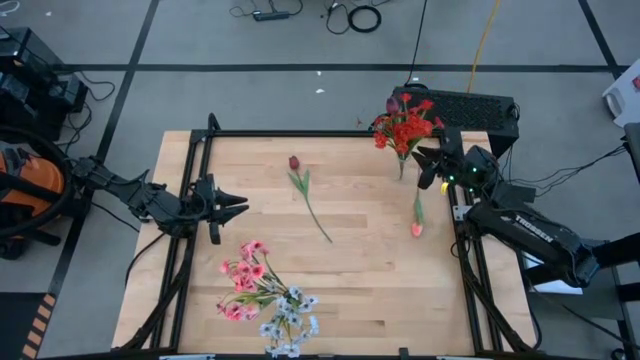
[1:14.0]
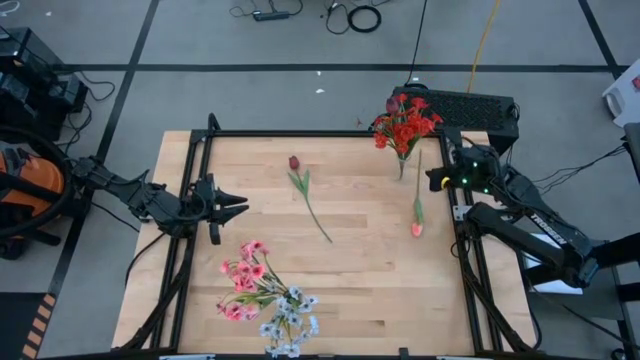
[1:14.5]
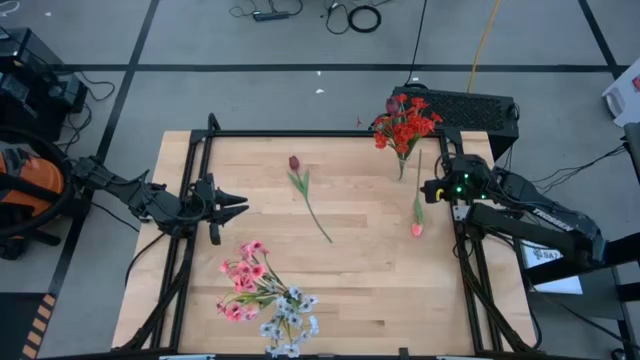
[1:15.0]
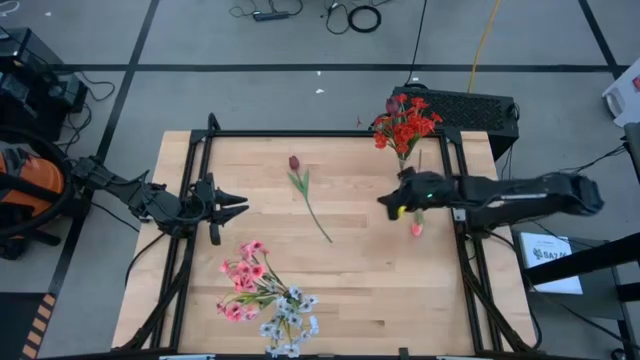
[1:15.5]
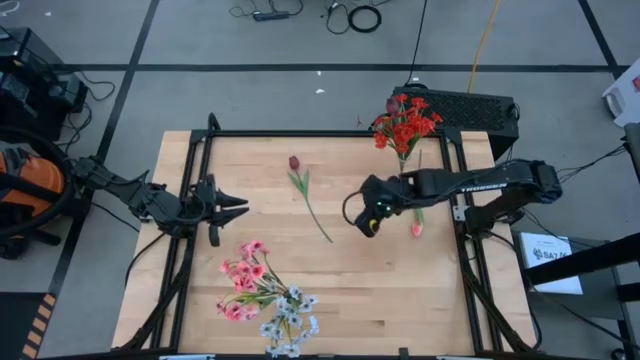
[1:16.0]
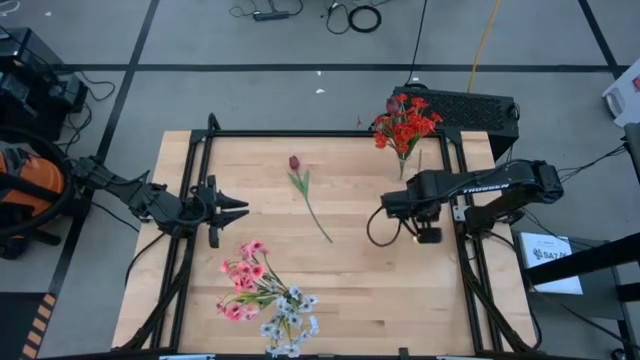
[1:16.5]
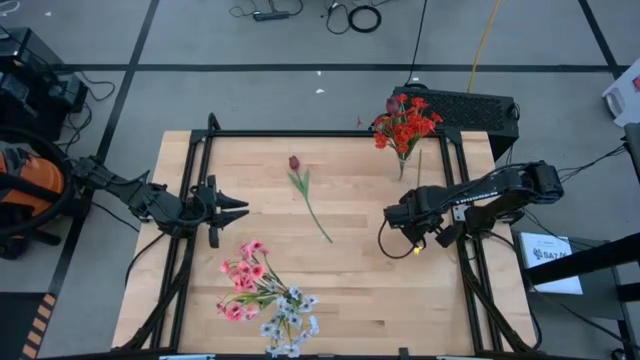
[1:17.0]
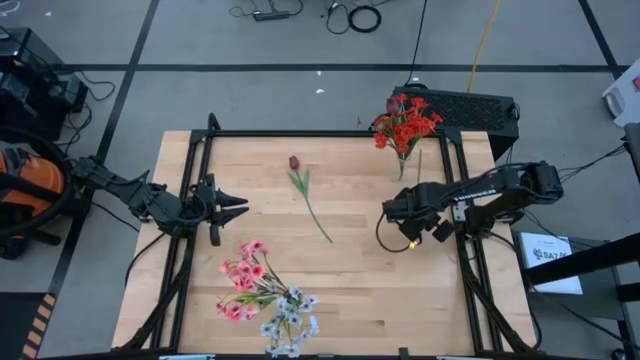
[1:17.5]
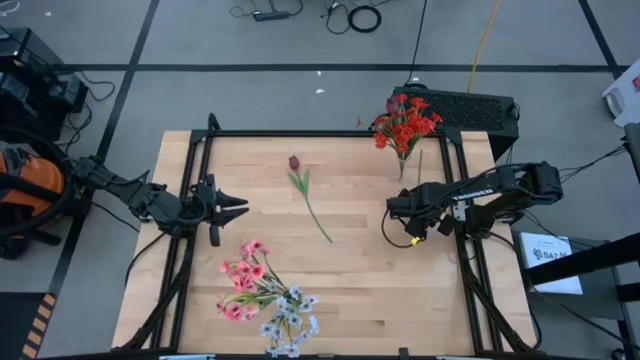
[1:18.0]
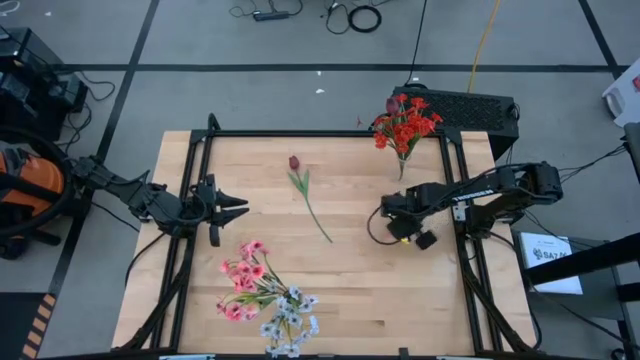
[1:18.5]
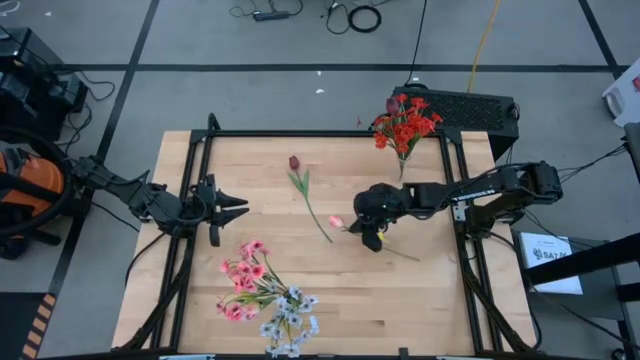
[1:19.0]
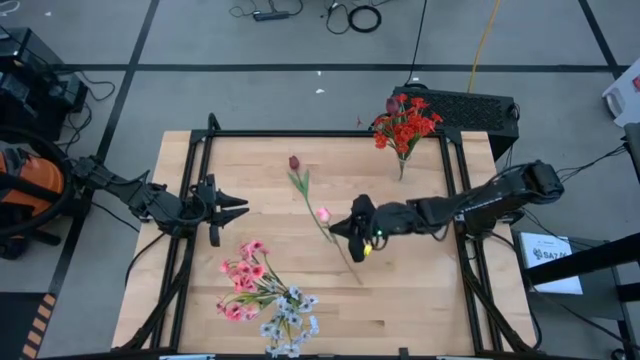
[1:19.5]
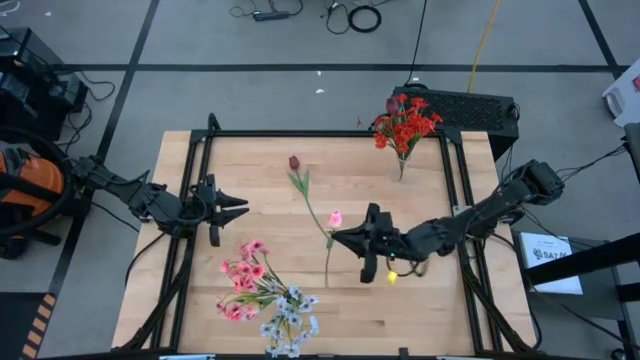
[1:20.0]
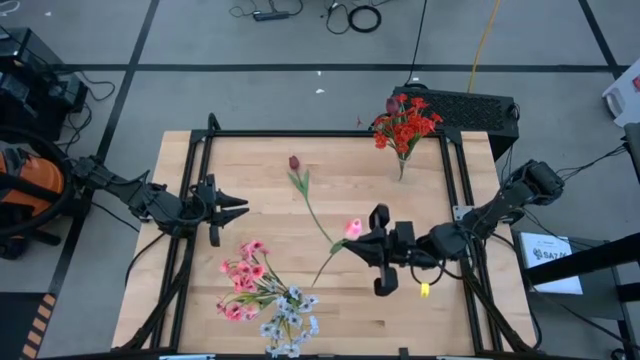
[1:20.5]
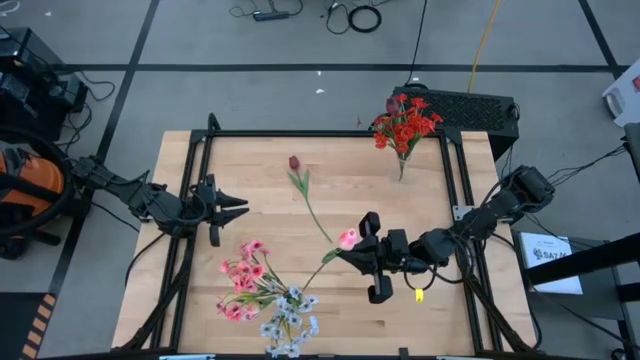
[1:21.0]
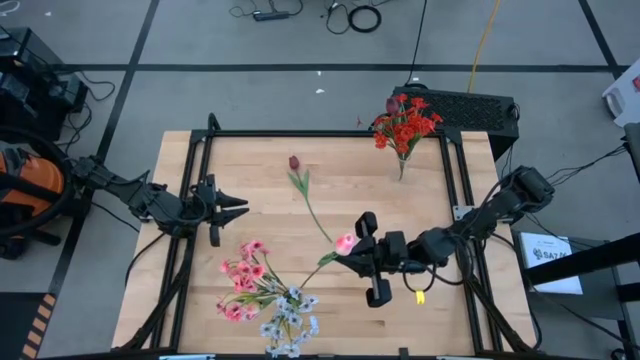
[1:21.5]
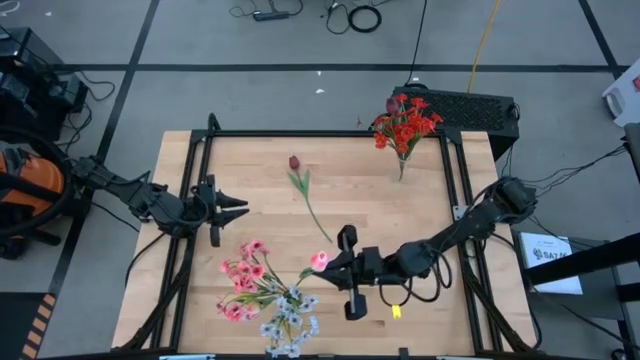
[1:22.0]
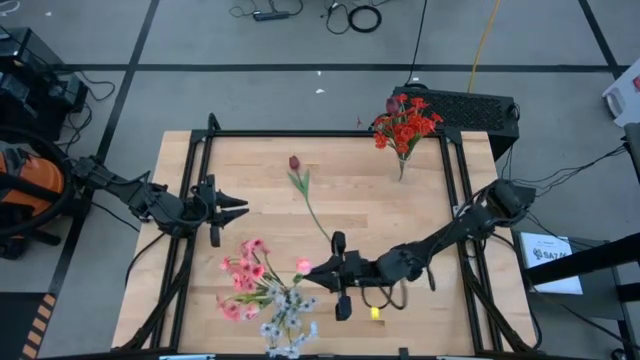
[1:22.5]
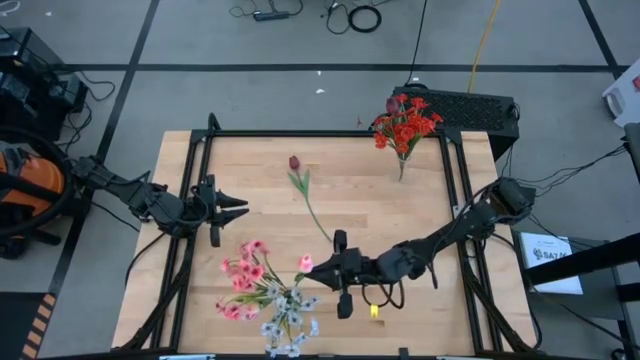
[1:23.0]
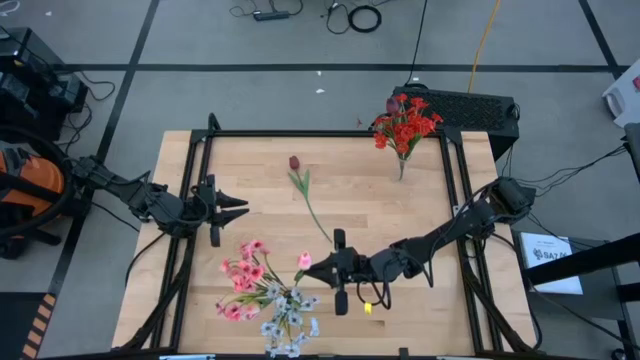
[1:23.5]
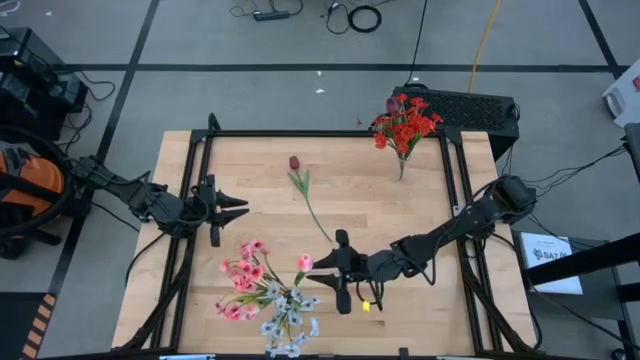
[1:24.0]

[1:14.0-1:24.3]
Task: Sort flowers into vase by color
Put the pink flower into the green vase

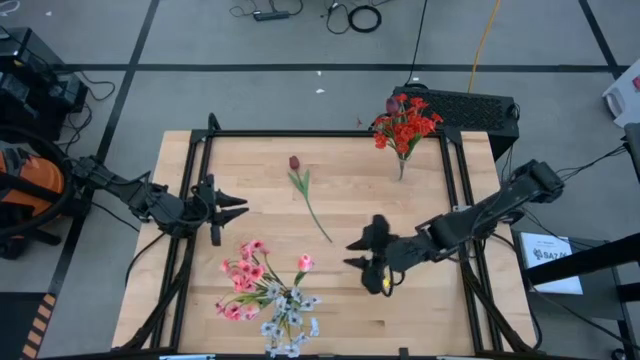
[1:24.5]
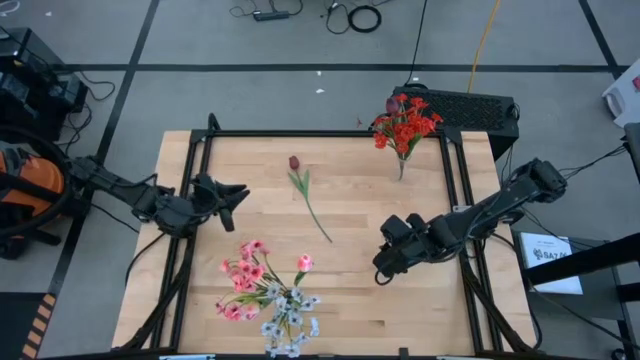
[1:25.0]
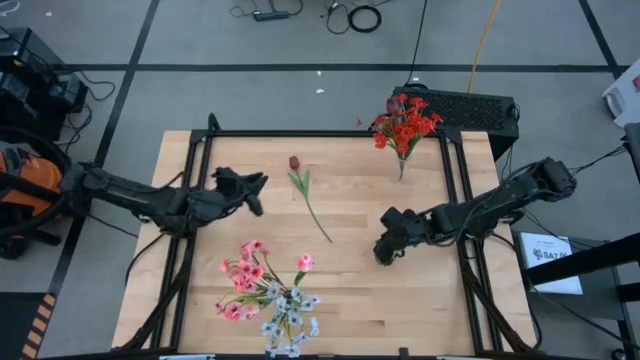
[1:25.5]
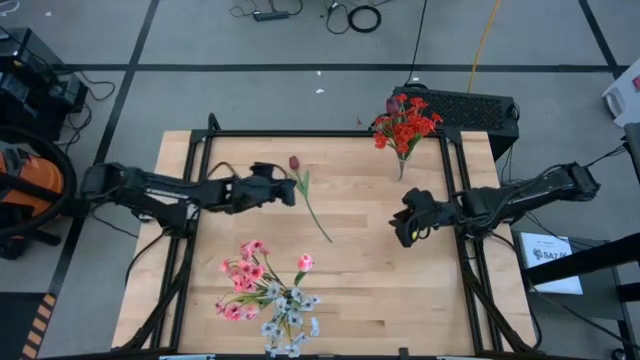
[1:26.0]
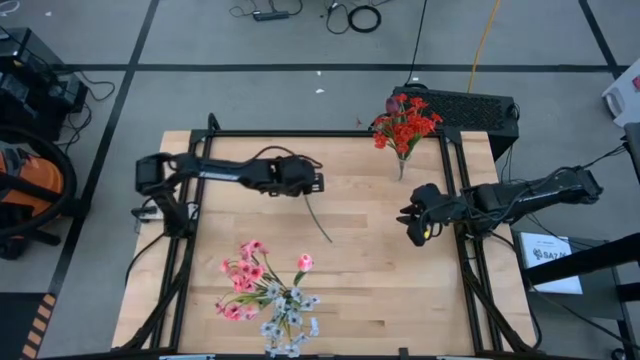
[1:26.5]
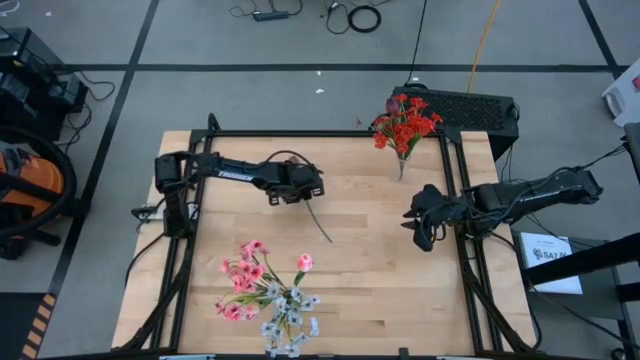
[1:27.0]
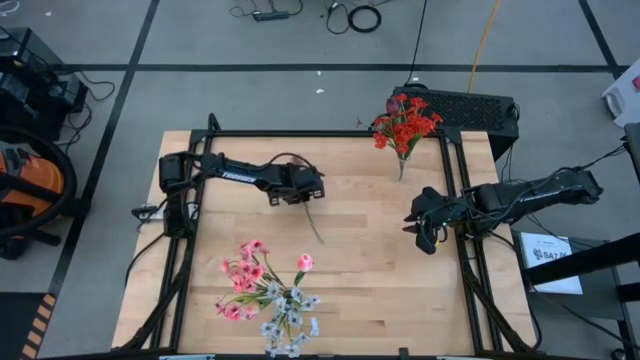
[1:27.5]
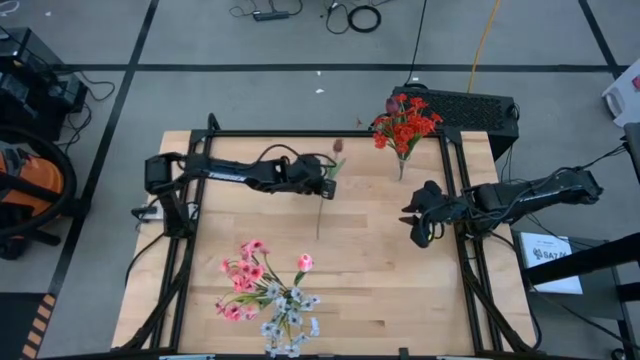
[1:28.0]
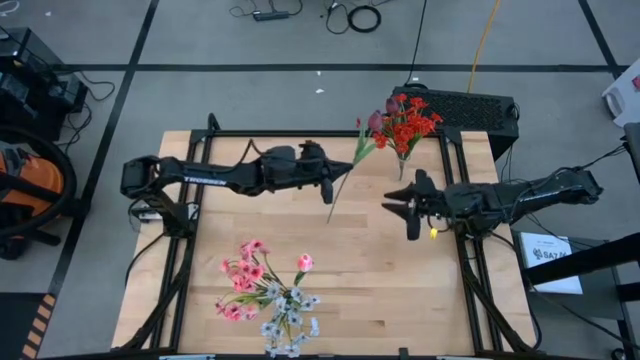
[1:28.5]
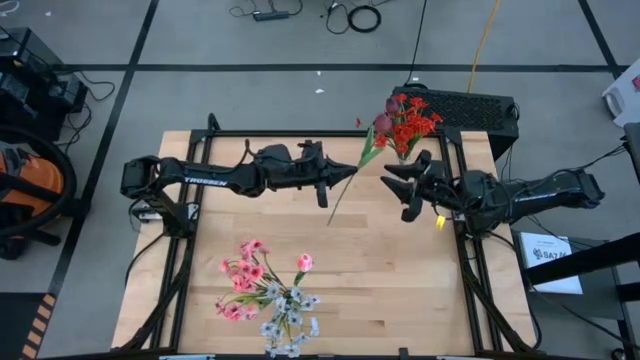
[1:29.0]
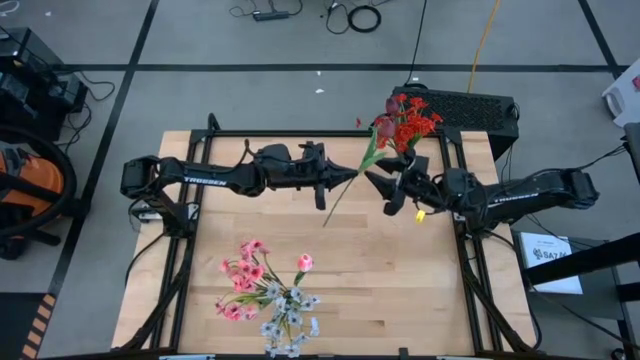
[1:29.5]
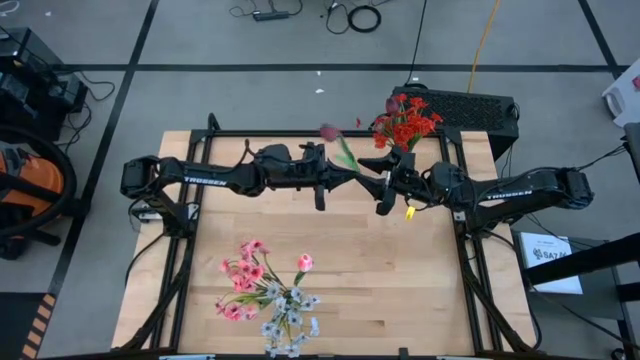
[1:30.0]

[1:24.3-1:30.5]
Put the red flower into the transparent vase

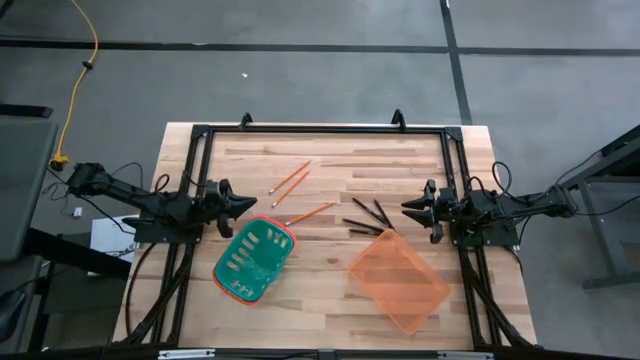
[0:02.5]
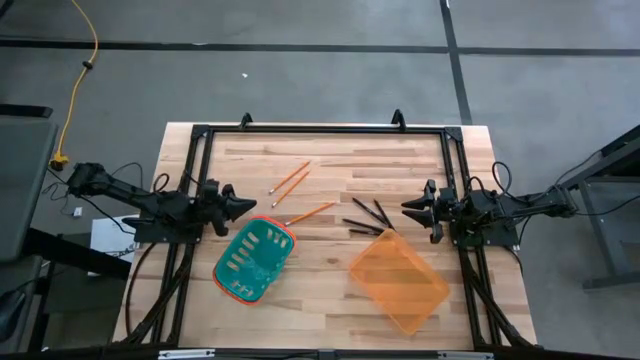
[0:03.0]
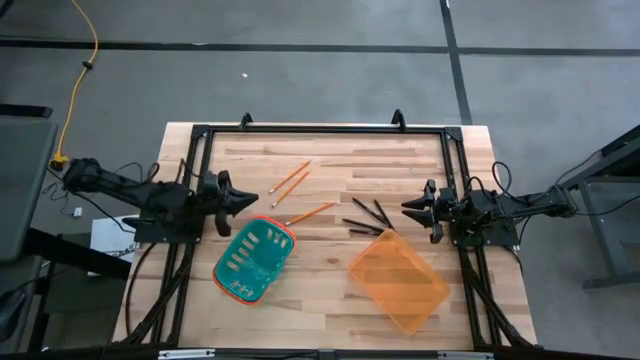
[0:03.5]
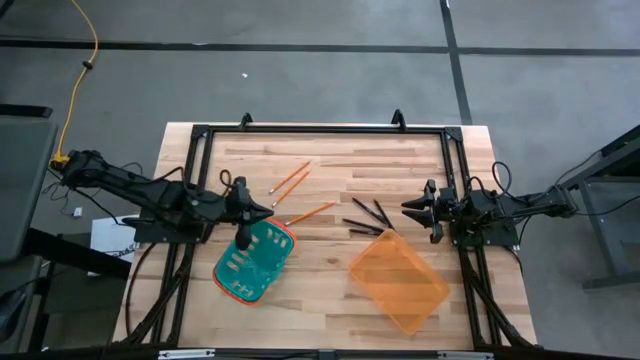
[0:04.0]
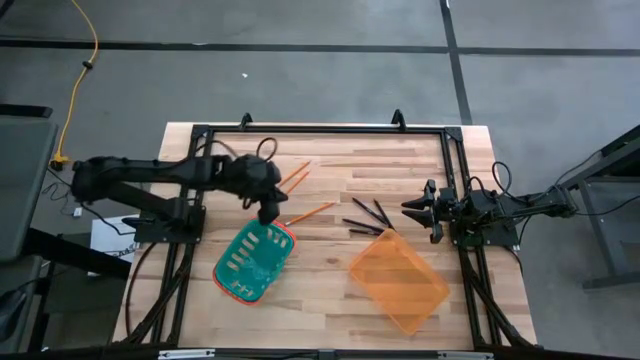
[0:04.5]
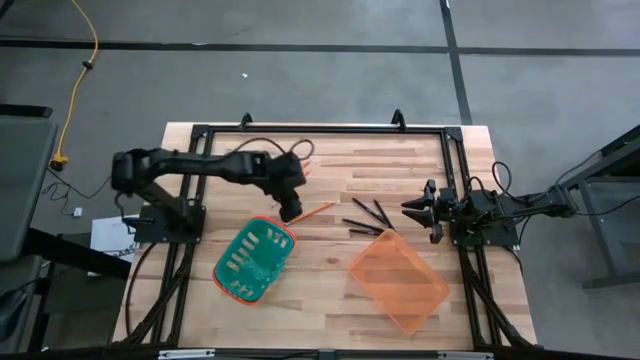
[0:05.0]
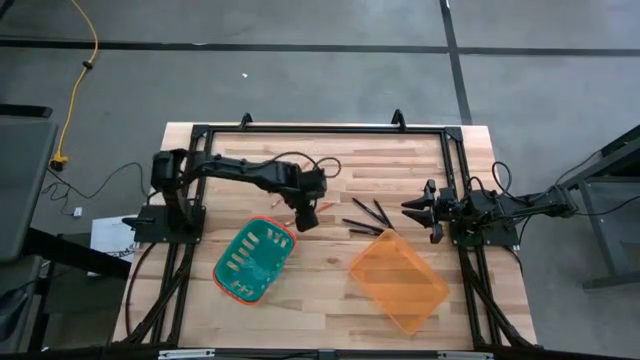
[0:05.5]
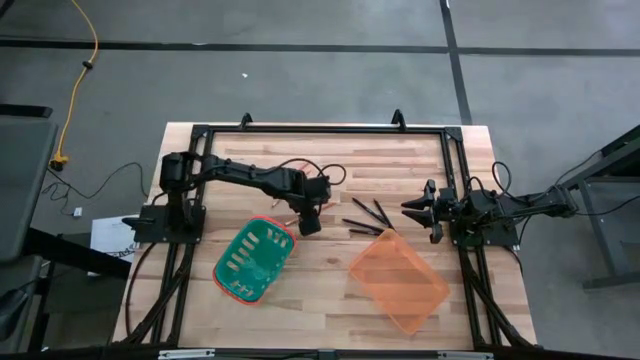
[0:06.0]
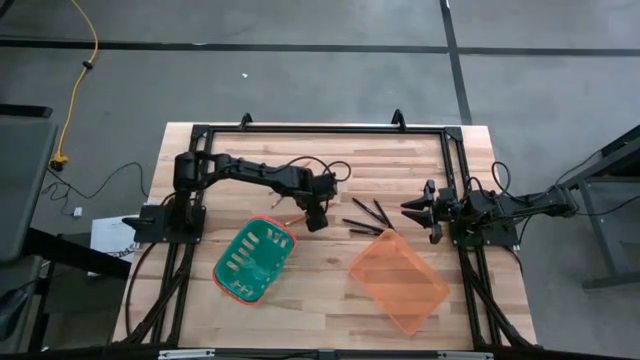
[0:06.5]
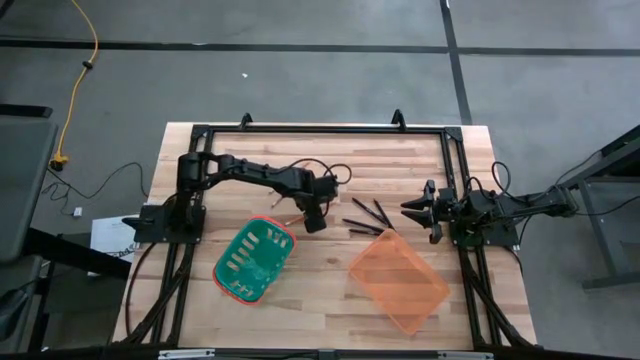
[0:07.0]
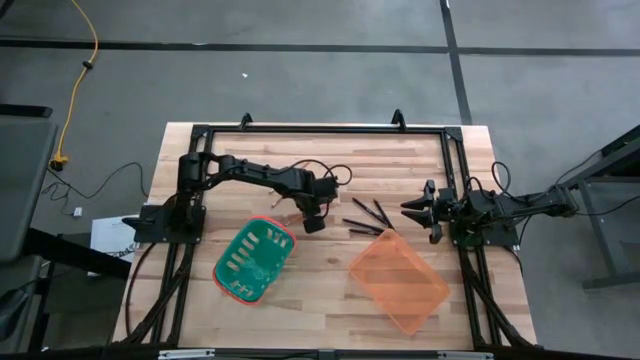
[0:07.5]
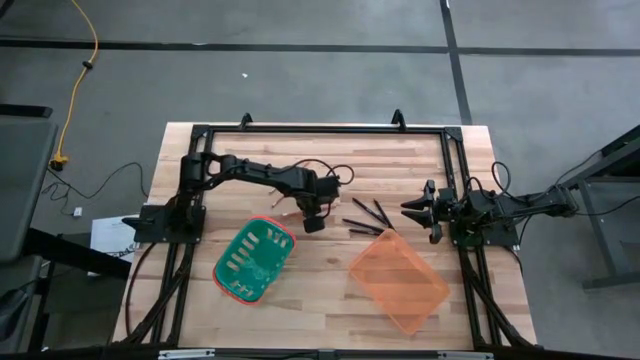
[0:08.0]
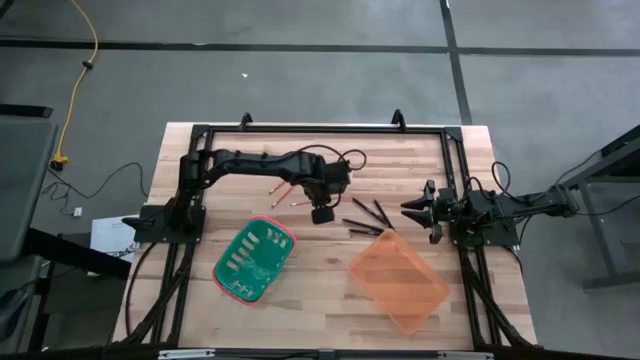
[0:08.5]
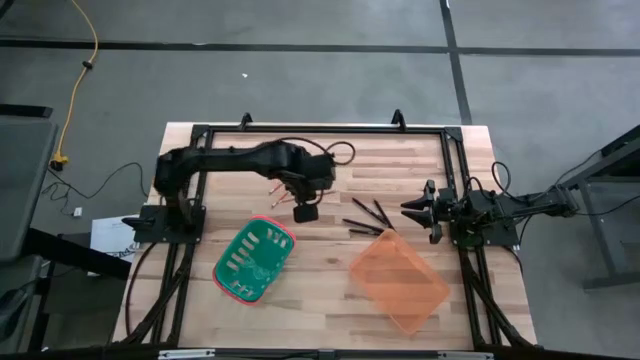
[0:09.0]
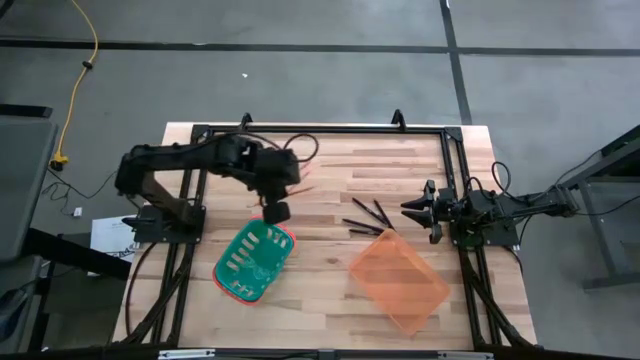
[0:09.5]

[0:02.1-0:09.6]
Task: Sort pens & pencils
Put the orange pencil into the blue basket
